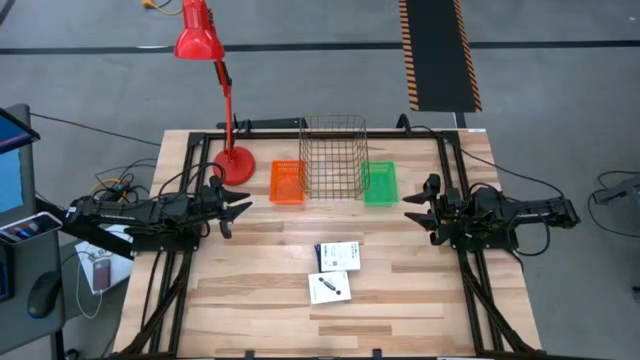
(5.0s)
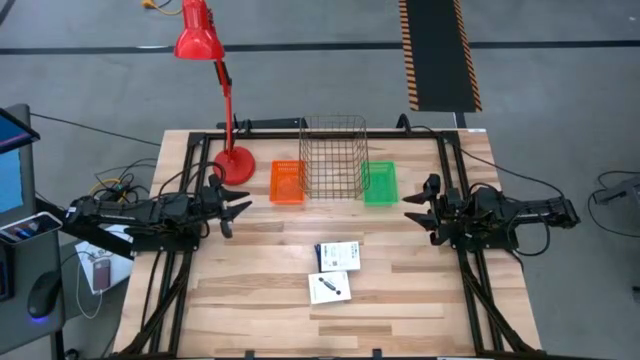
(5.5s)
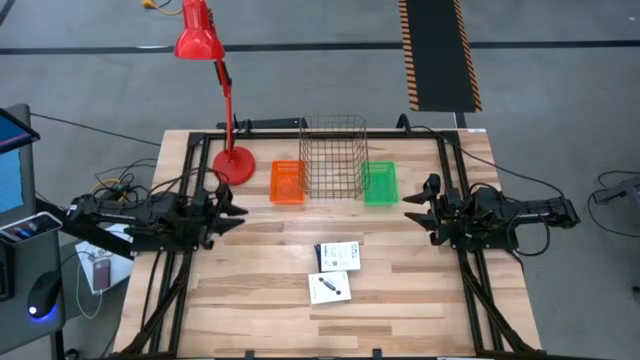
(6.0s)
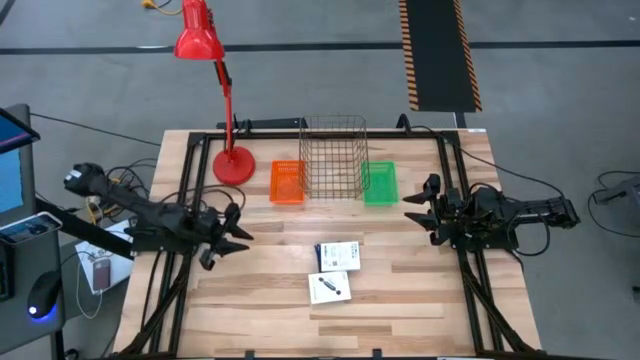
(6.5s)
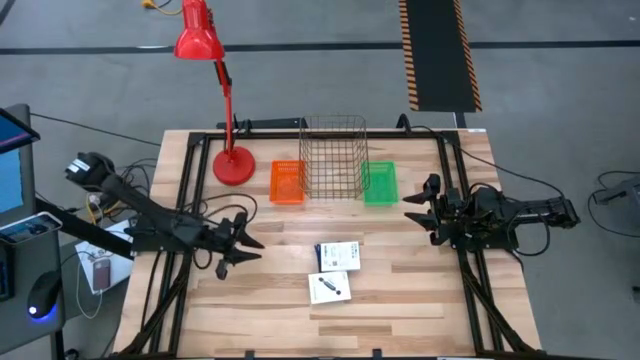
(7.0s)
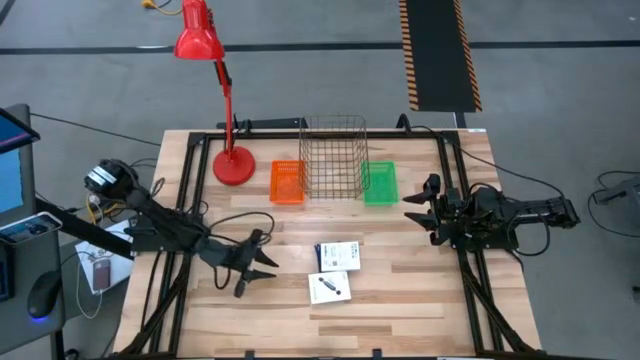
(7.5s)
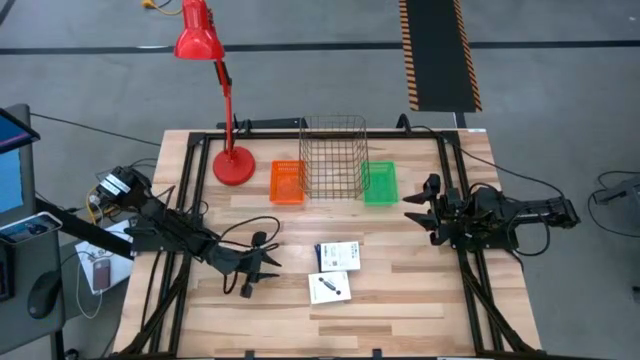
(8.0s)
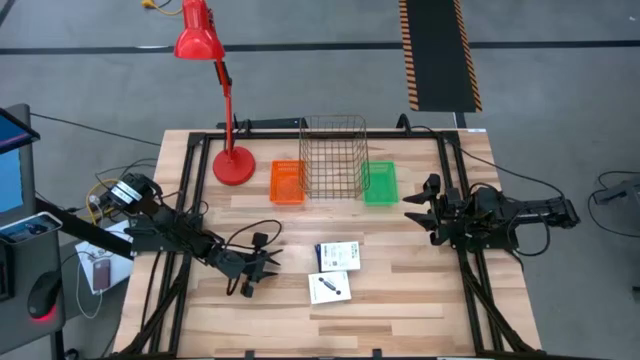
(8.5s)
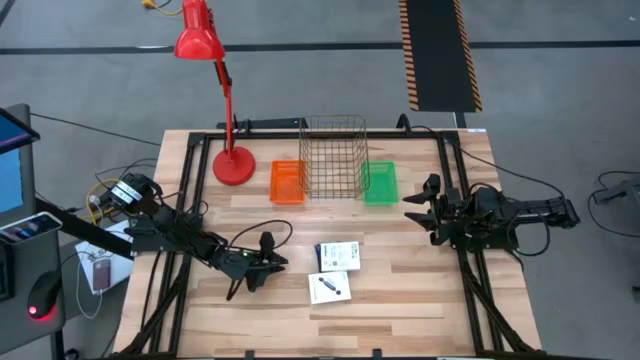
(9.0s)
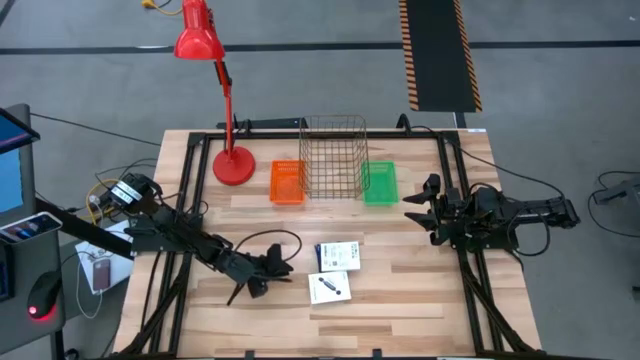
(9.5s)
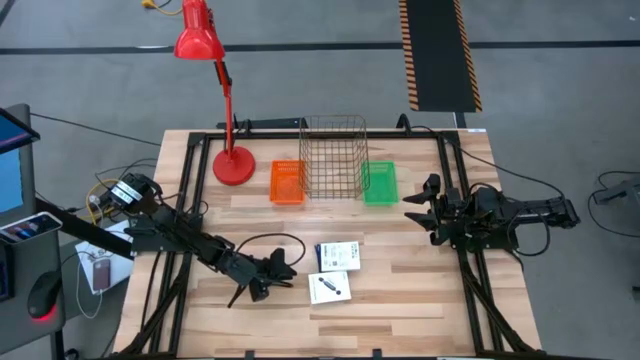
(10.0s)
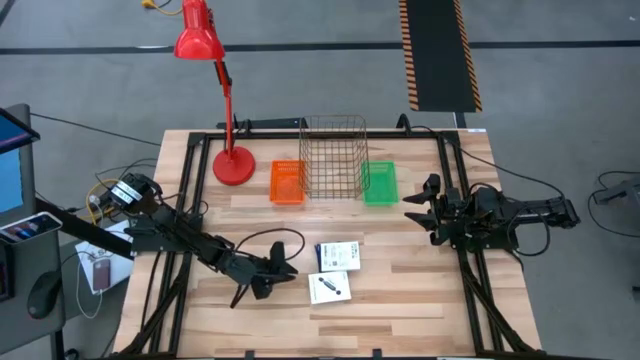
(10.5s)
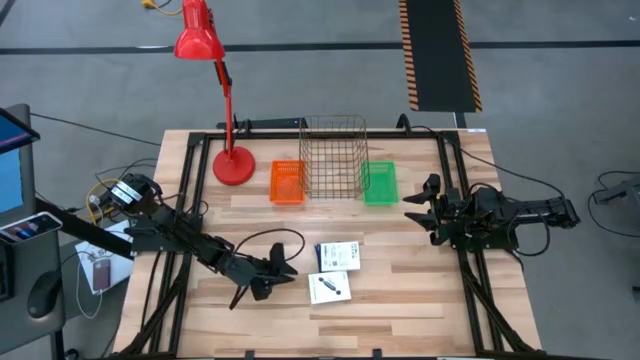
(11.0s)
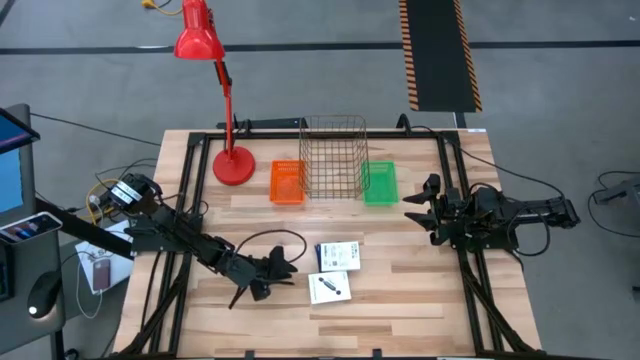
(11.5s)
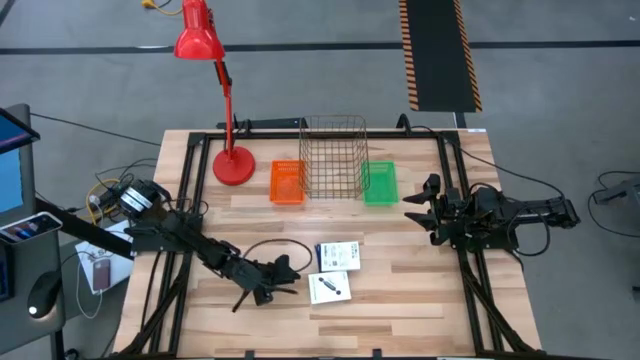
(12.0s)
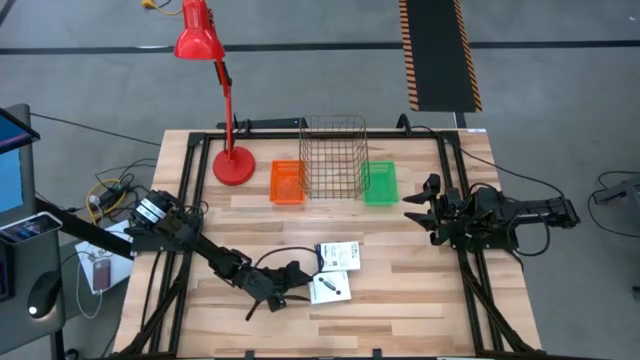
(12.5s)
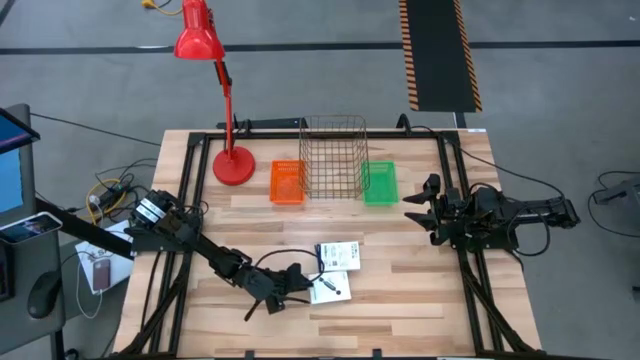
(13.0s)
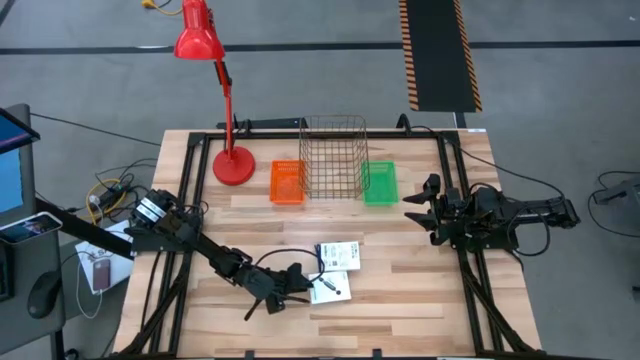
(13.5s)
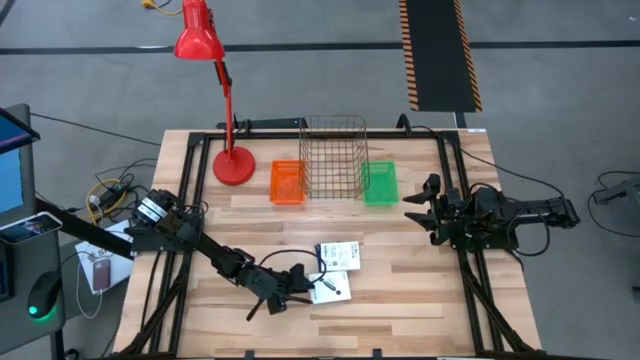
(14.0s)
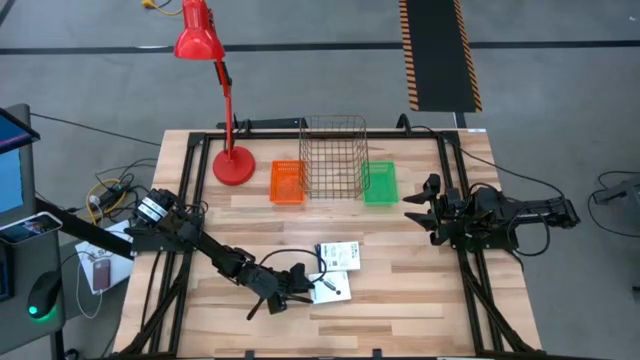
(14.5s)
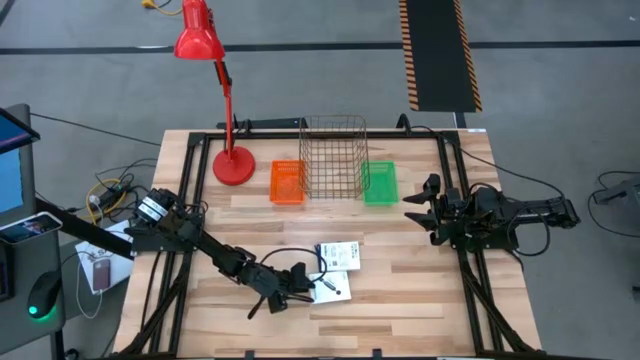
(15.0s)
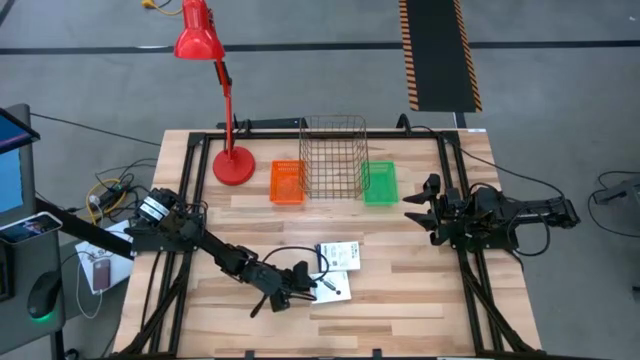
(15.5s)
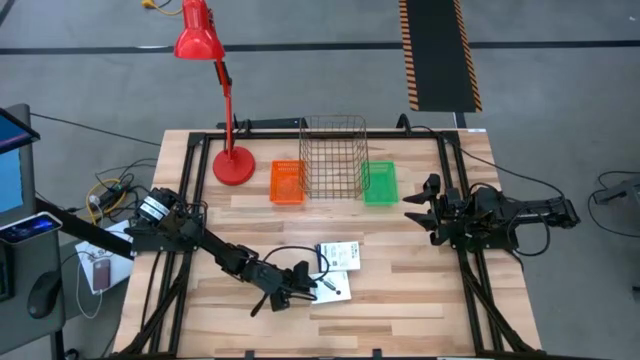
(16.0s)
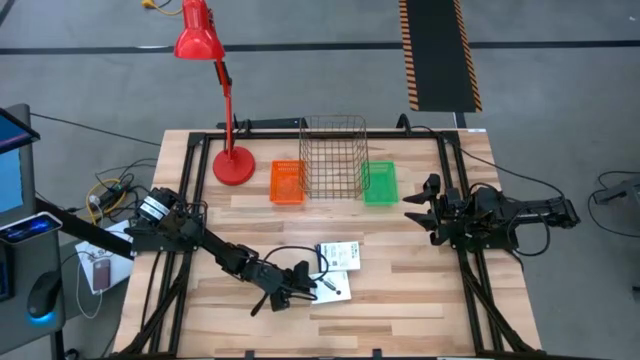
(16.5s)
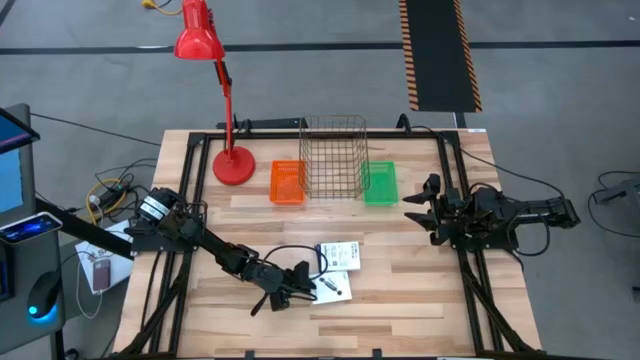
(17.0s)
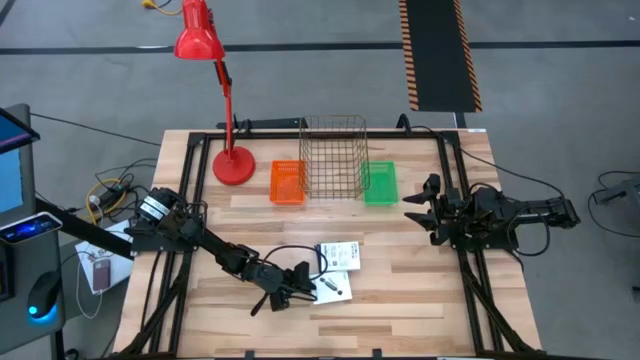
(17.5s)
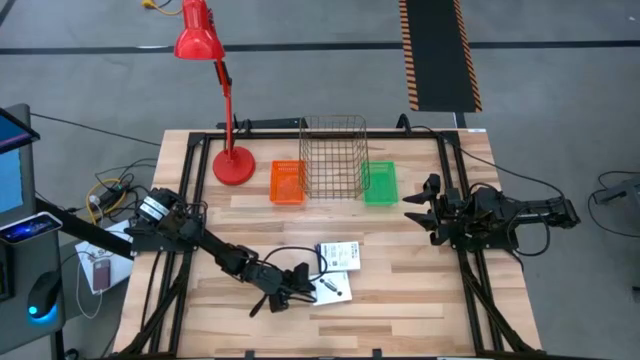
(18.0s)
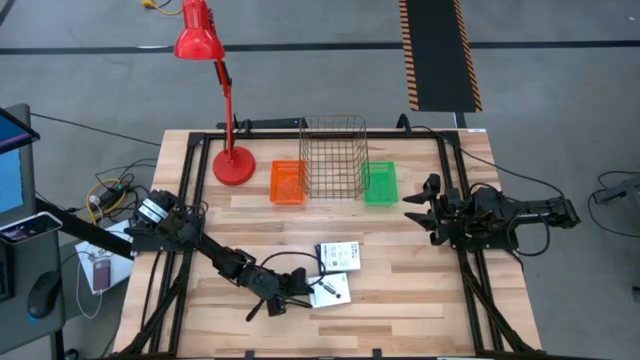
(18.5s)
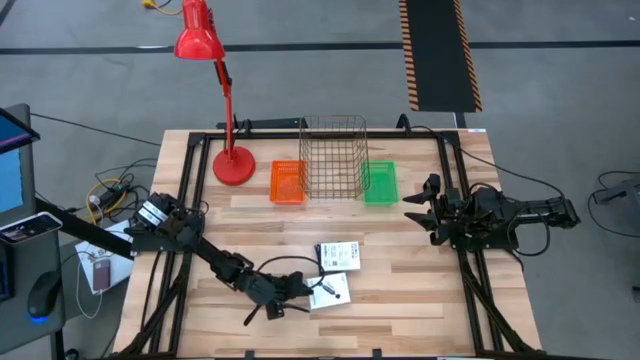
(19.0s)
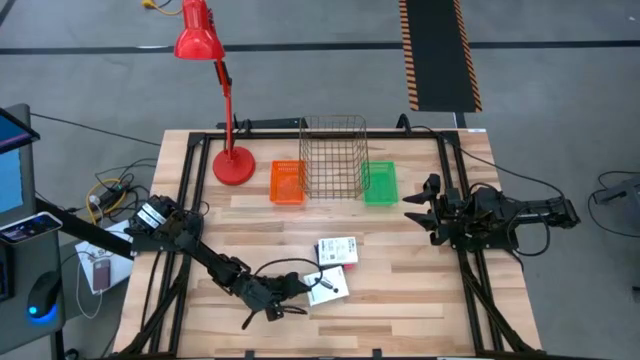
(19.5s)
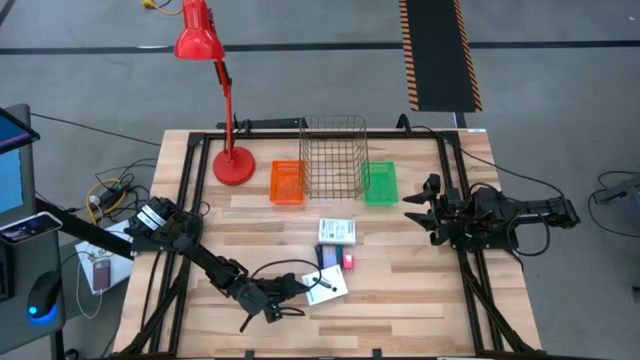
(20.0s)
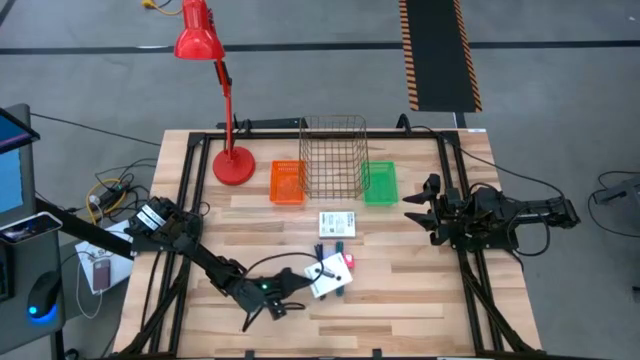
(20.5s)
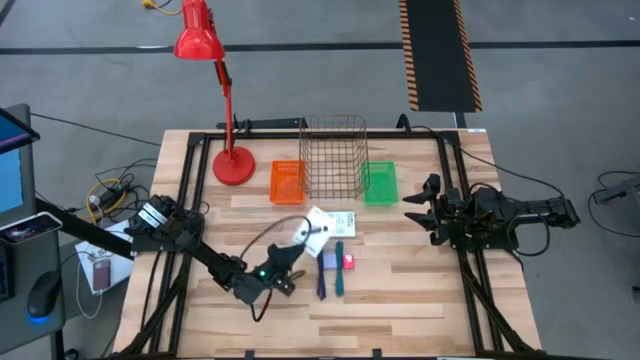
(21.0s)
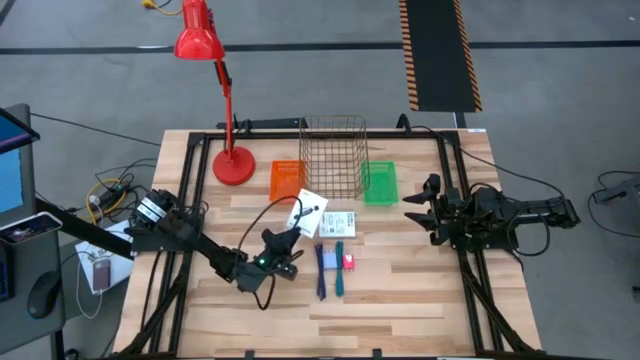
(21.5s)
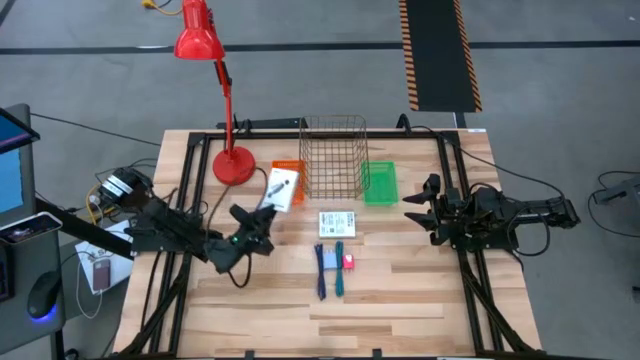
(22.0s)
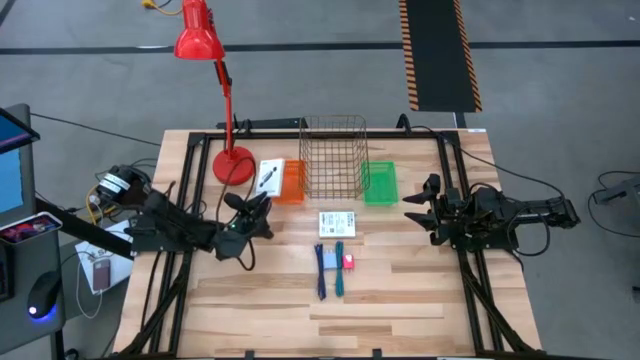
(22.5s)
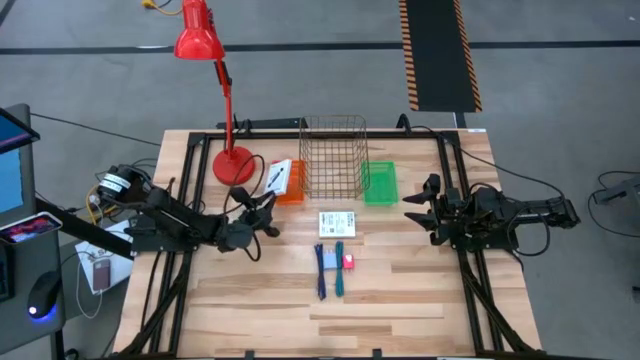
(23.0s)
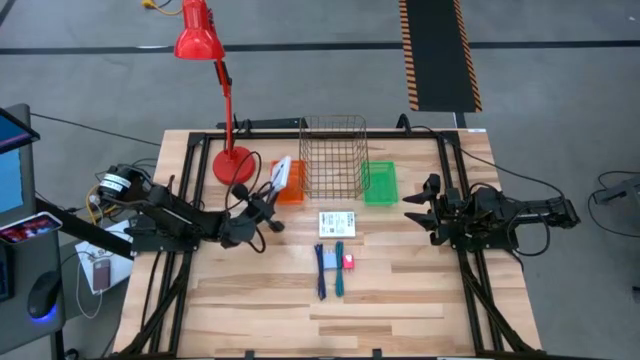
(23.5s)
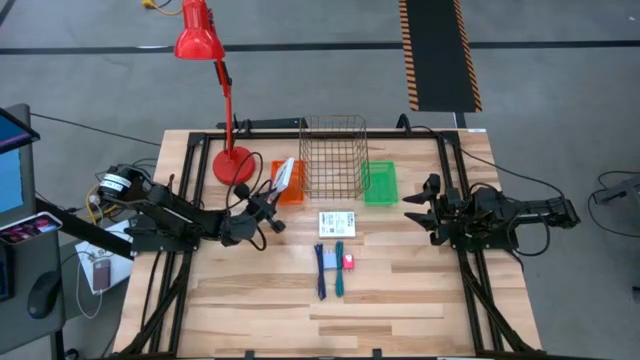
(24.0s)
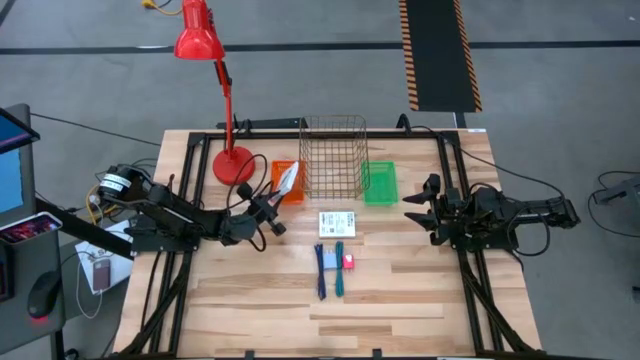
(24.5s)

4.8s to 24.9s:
Task: Pick and place items into bin
Put the bottom white card reader box into the orange basket
